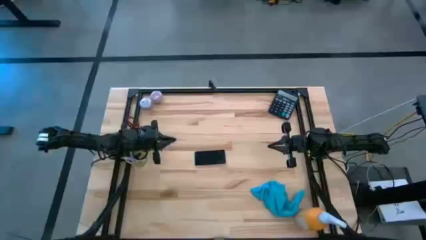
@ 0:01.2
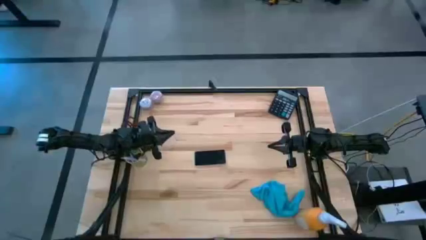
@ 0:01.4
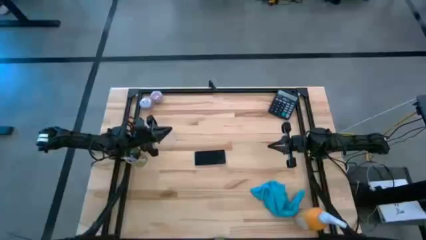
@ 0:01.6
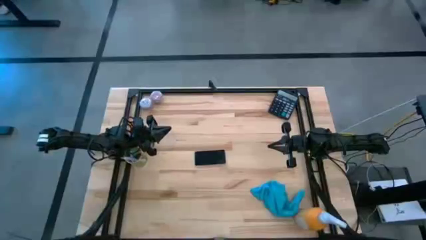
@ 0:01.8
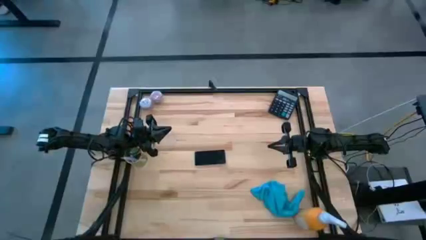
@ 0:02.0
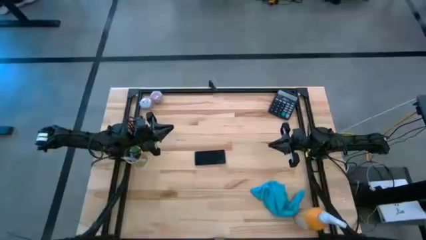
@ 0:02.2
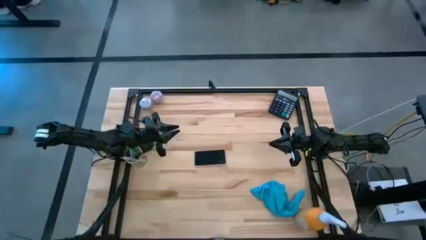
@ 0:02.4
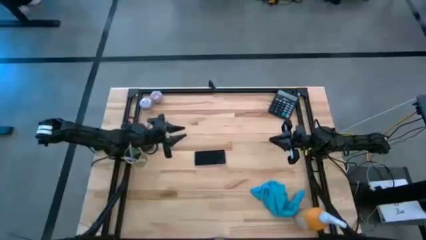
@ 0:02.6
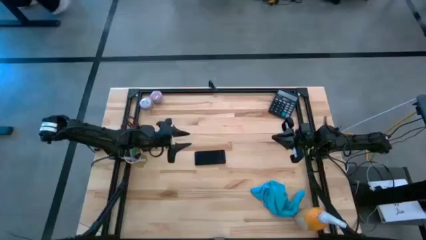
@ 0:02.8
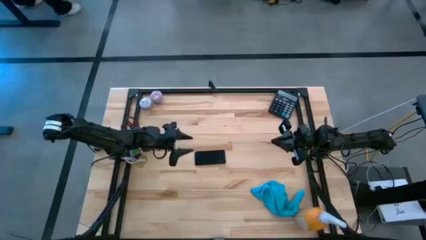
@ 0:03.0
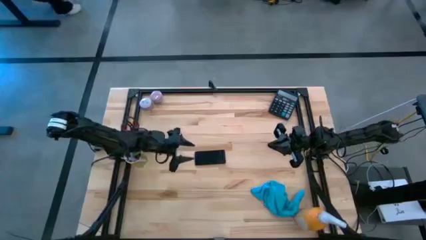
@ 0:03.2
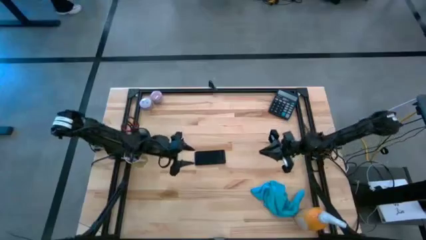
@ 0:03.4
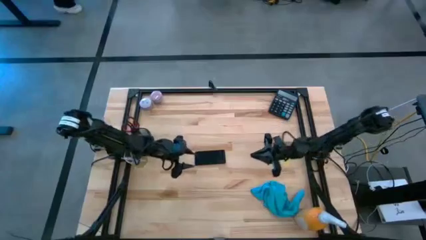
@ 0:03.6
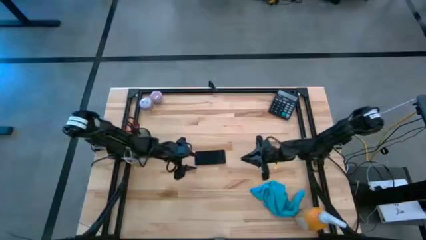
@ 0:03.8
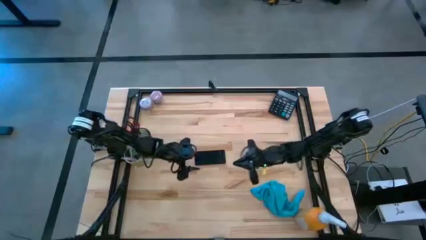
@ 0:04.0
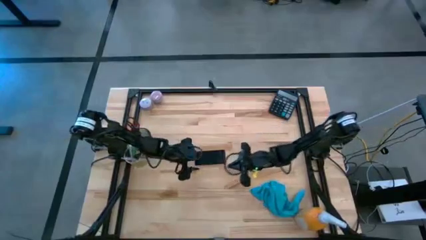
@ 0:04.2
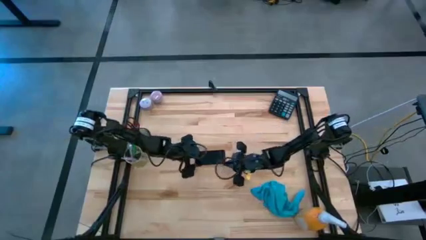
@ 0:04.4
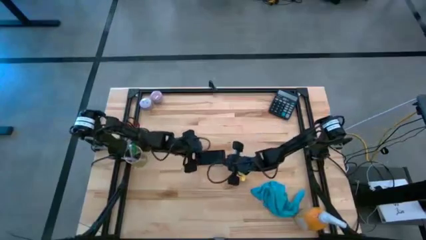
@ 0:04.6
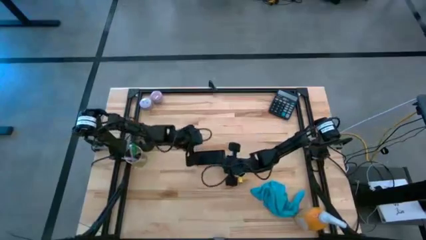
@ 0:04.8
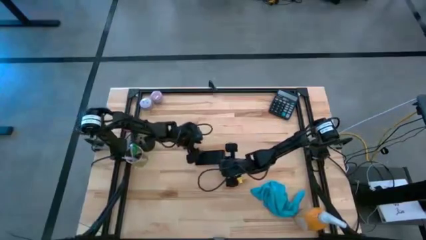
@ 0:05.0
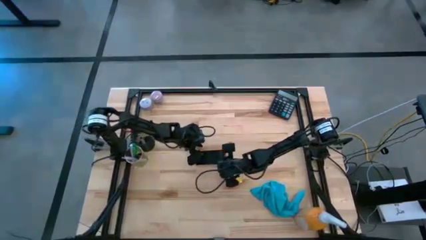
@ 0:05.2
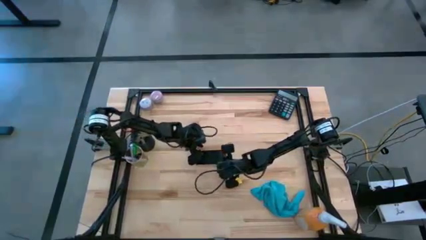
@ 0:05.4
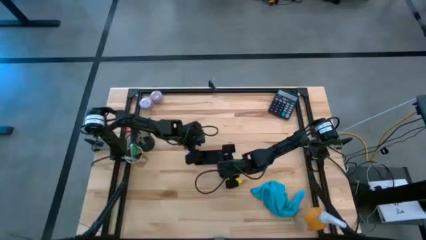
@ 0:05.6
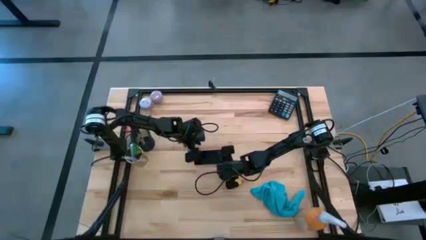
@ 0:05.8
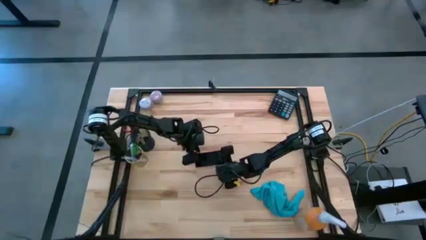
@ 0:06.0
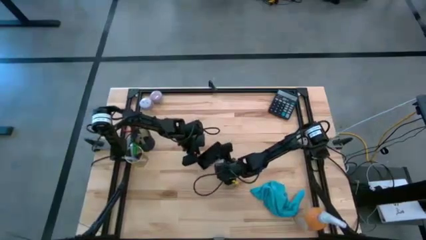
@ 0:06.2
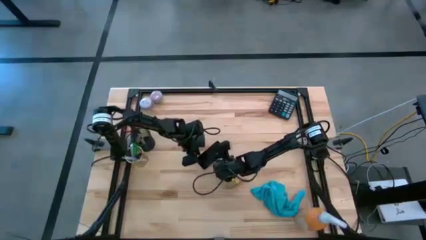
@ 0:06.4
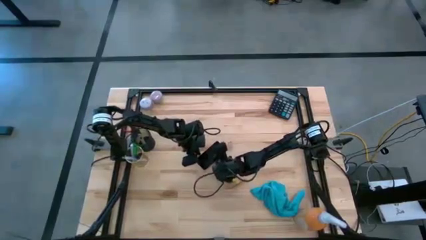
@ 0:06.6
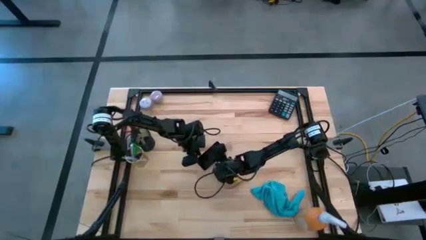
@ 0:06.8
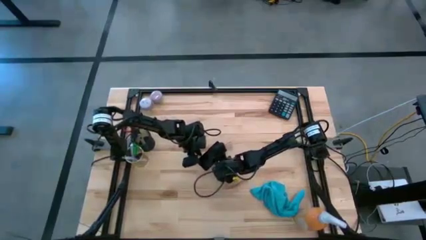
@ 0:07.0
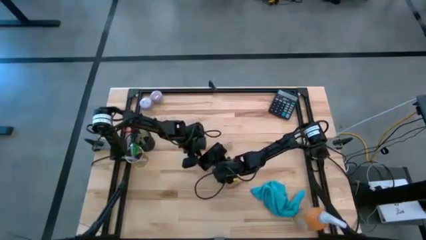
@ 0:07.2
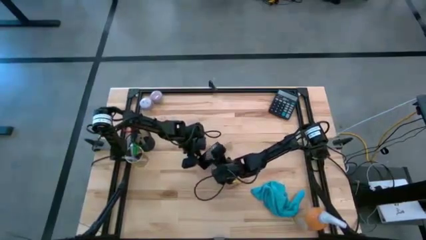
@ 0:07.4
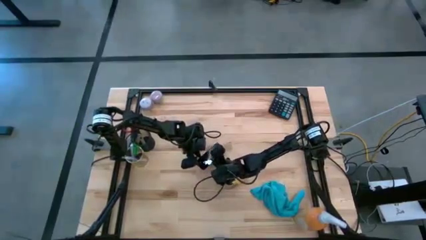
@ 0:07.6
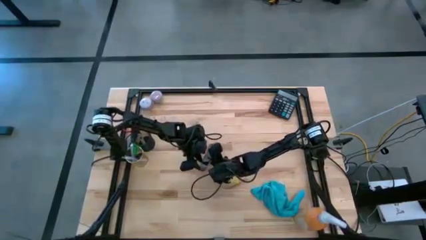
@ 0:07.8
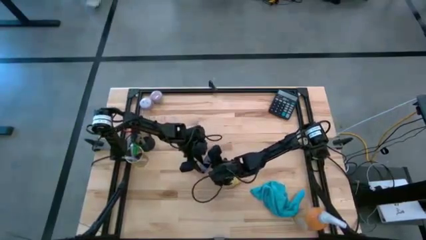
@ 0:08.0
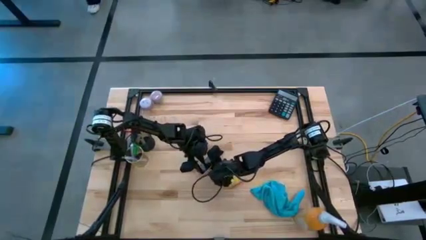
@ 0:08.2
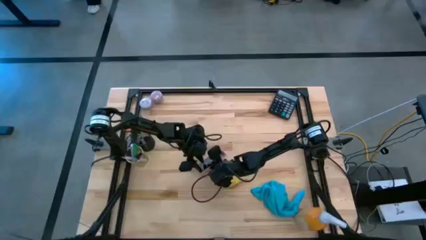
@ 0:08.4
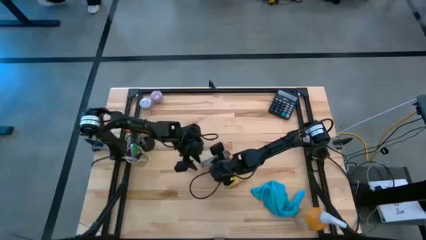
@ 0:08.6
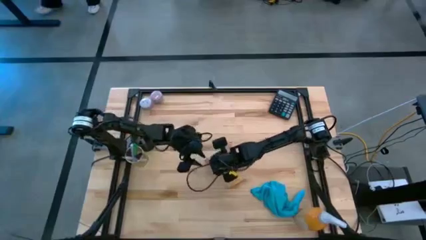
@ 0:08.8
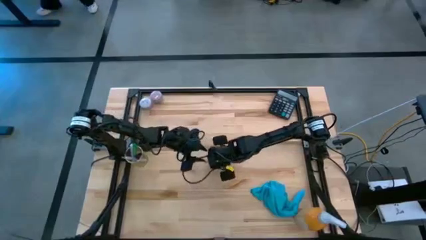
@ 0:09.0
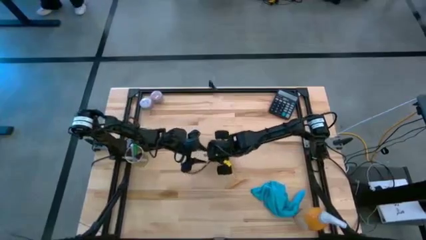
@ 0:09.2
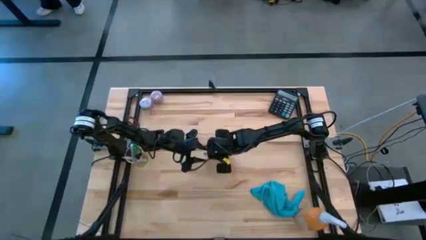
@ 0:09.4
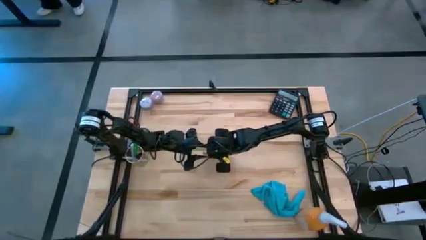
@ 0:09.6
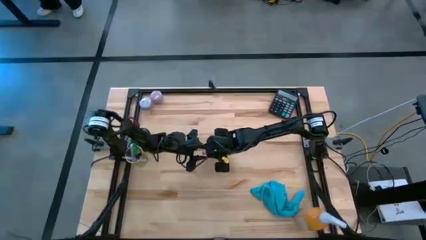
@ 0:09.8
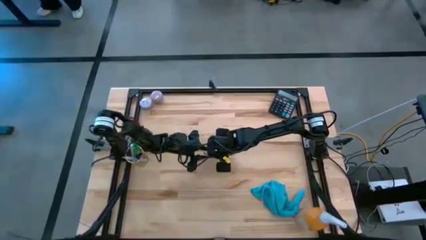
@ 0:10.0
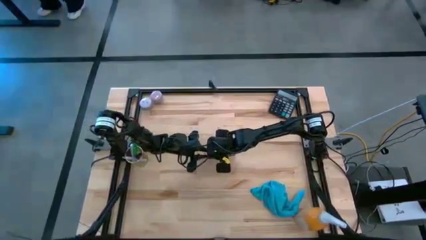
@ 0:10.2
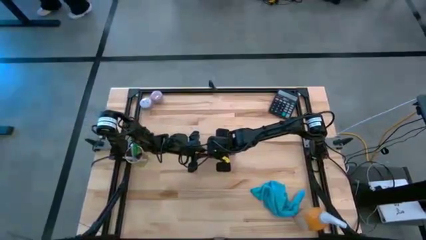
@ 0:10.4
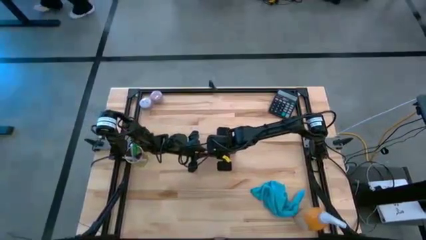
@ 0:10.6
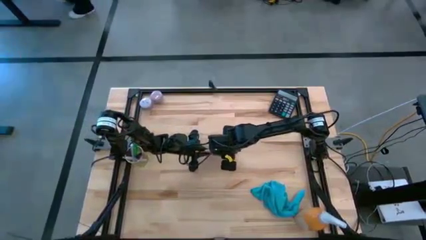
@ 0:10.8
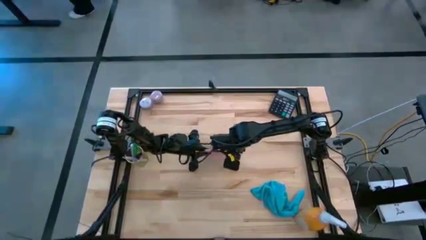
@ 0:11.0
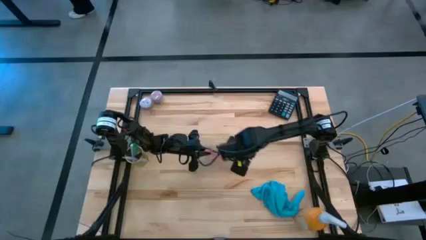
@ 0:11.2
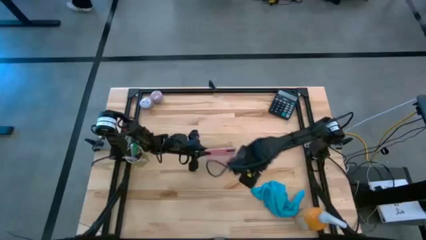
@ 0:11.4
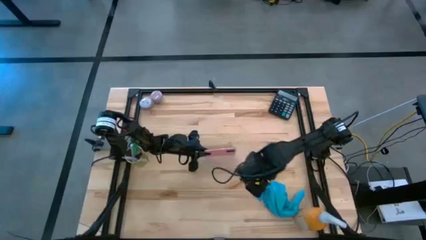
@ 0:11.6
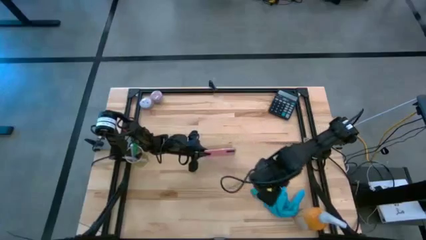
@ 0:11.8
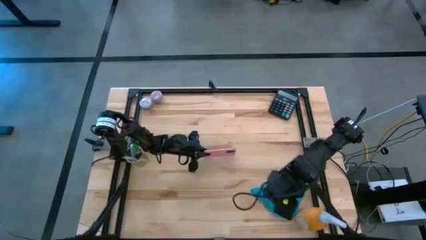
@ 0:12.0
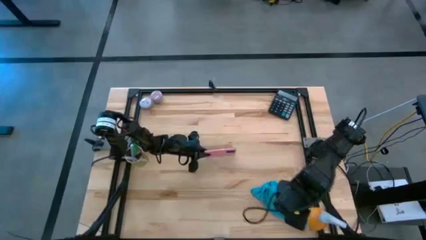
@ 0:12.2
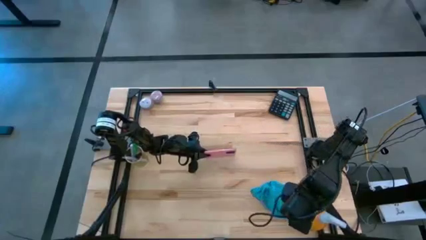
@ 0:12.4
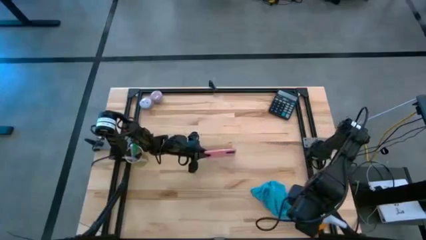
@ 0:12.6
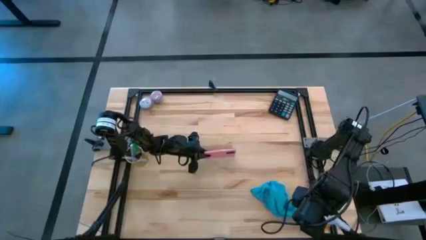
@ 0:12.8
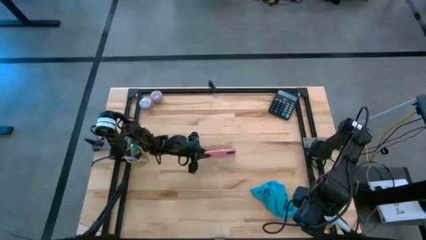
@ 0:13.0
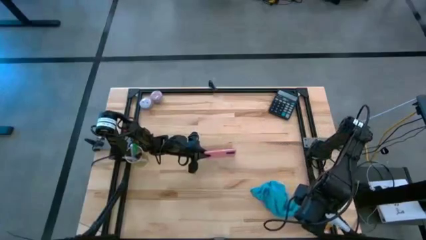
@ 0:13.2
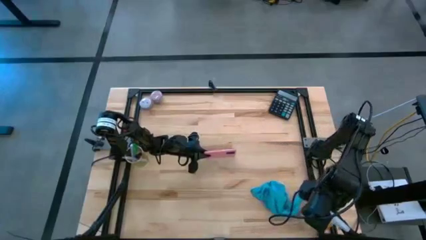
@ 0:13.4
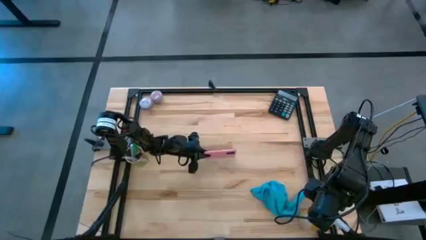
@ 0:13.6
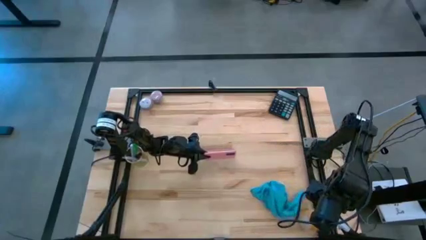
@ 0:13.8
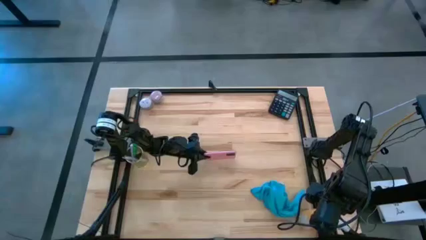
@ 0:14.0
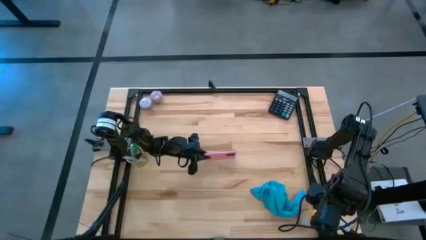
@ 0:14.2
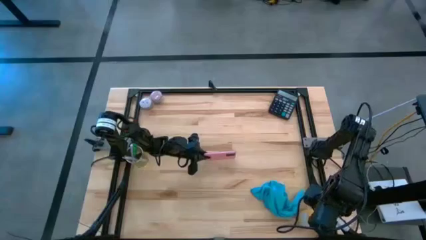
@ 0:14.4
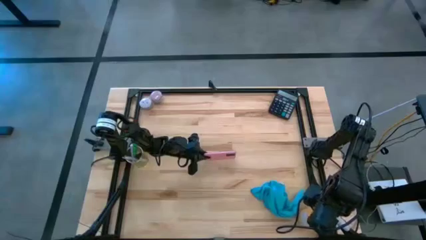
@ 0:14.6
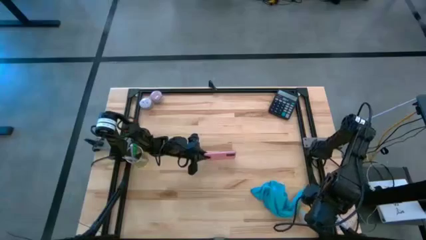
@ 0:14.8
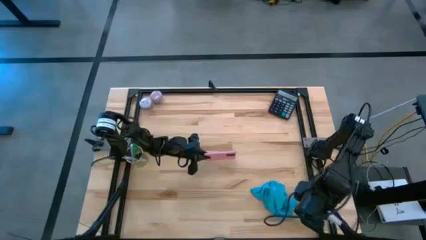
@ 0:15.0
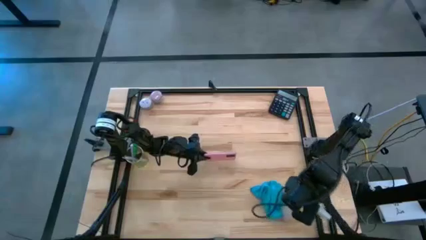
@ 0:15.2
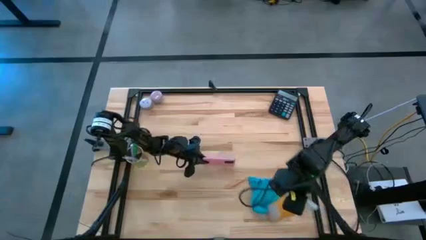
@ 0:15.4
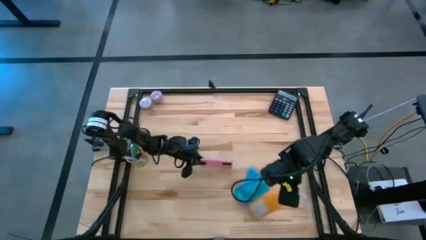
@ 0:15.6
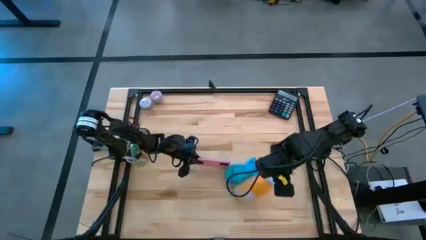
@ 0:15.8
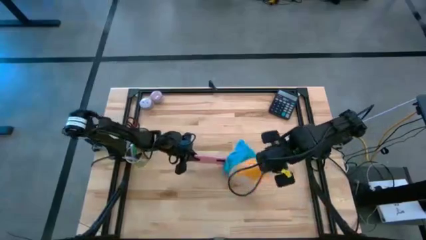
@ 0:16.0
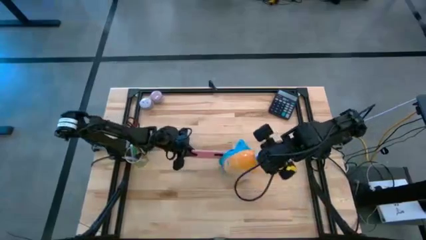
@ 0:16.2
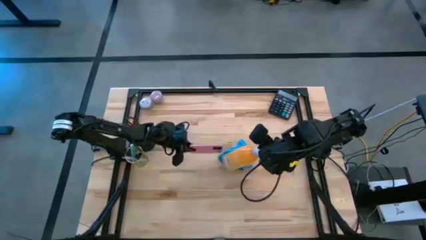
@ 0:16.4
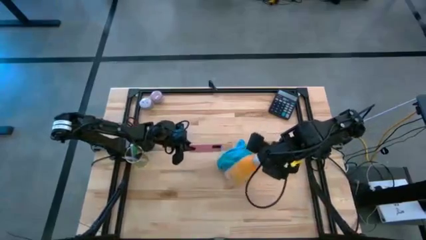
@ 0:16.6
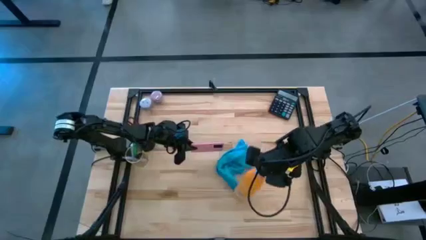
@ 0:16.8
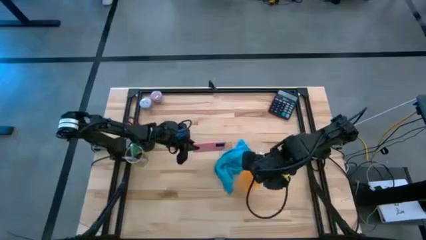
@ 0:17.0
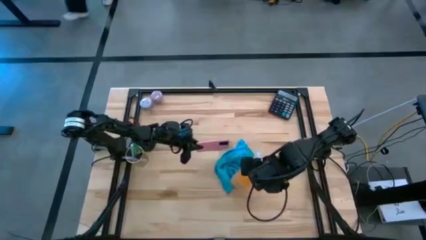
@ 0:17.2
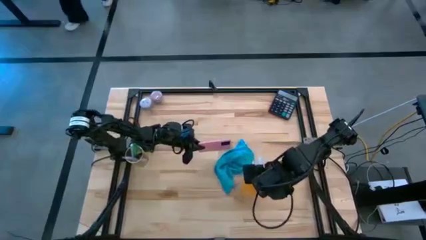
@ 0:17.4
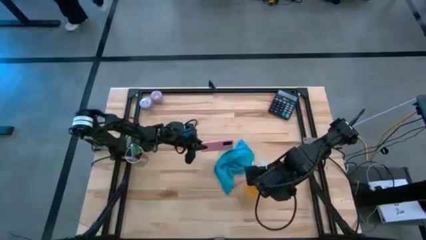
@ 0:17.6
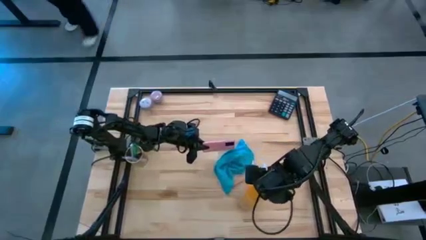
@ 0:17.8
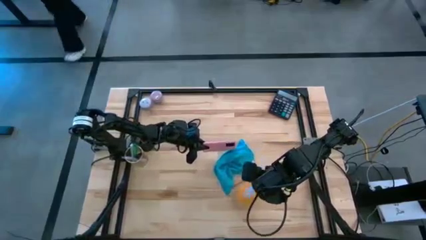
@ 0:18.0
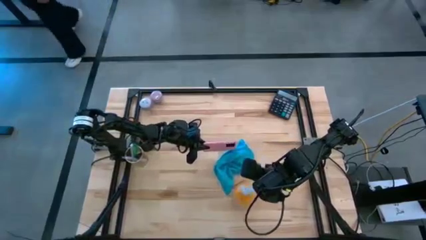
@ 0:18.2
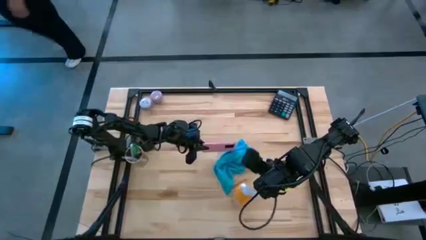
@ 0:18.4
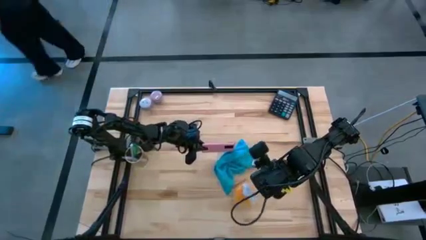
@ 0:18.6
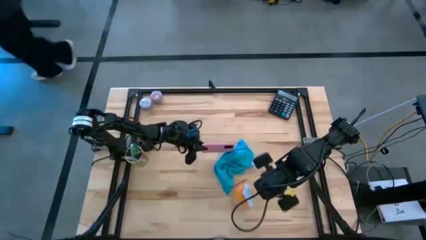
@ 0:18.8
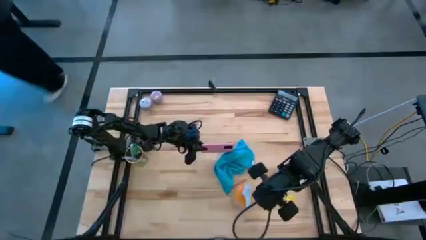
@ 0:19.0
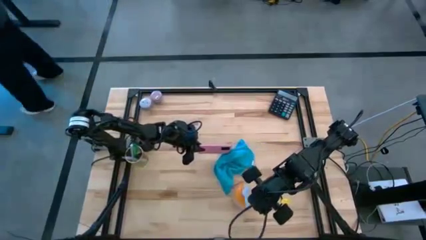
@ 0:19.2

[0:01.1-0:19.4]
Task: Apply microfiber cloth
Spray the pink cellphone with the orange spray bottle
